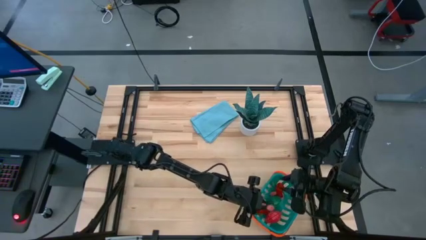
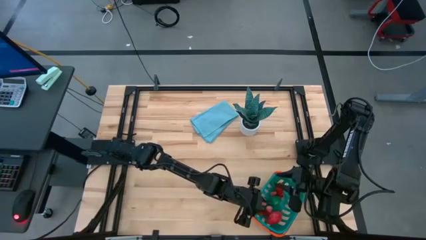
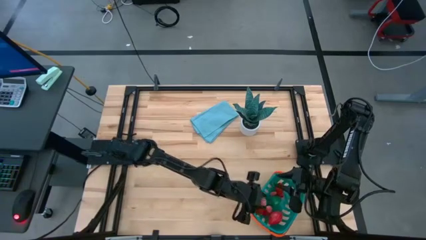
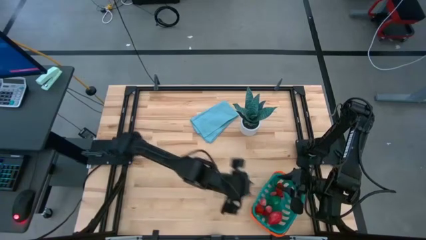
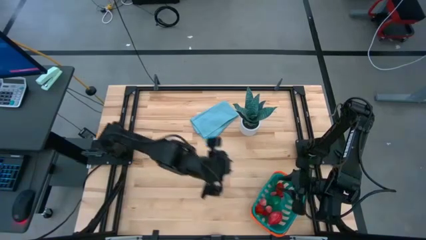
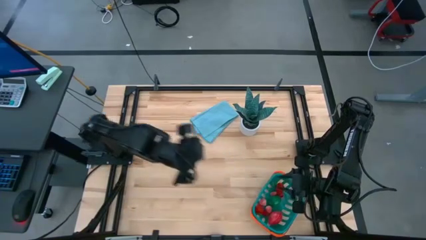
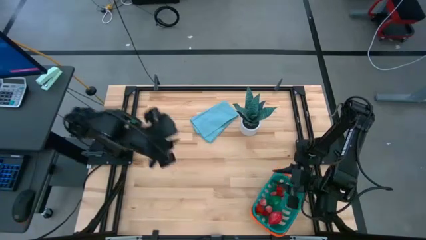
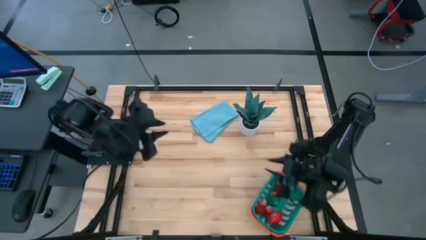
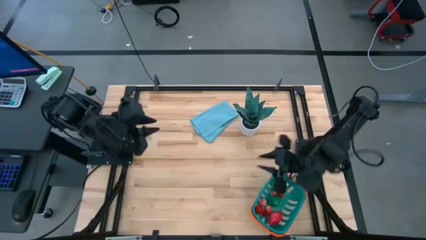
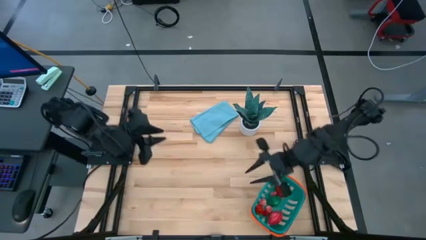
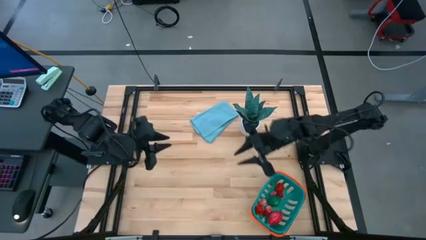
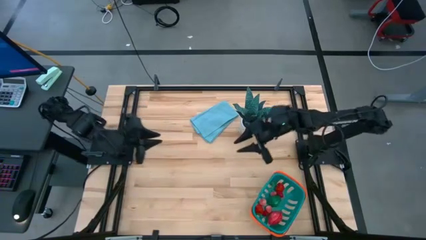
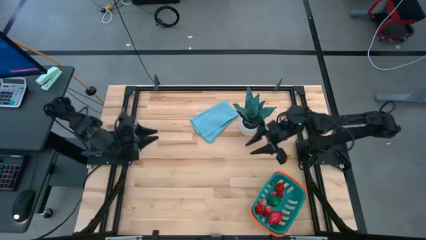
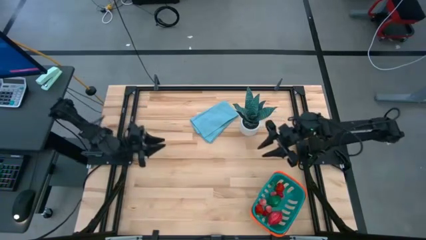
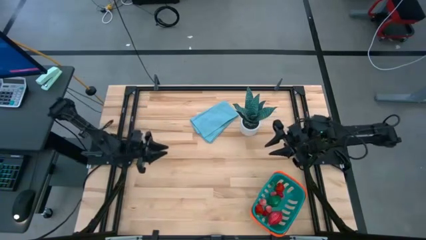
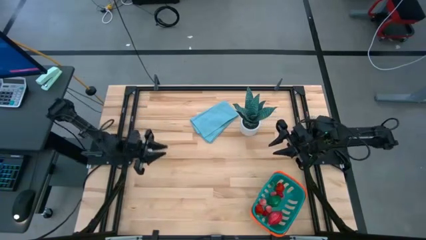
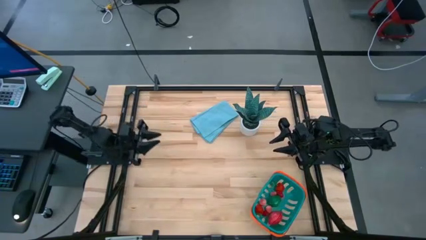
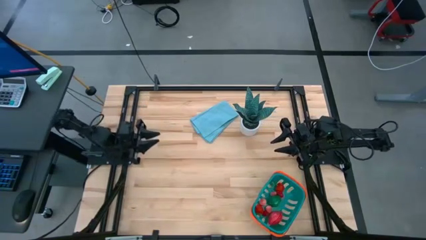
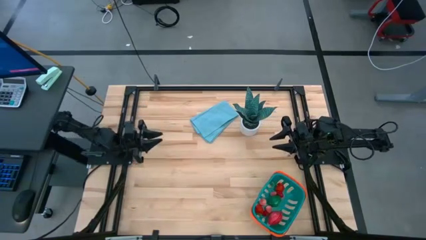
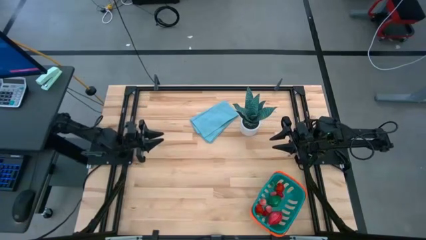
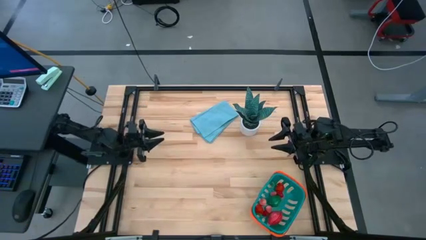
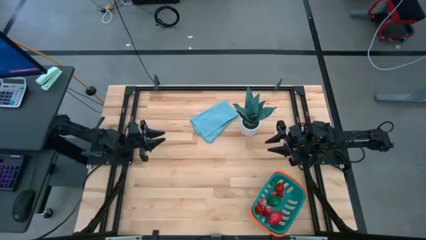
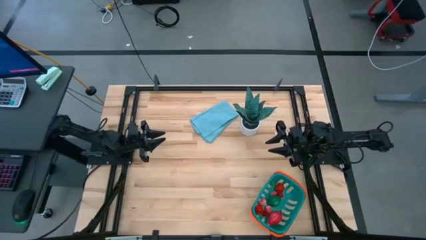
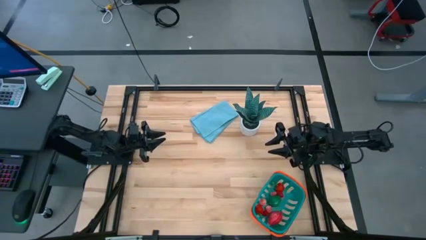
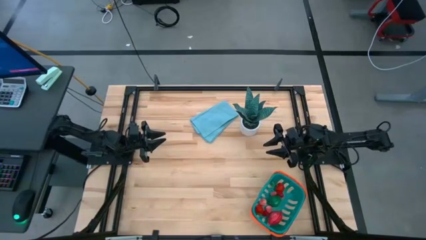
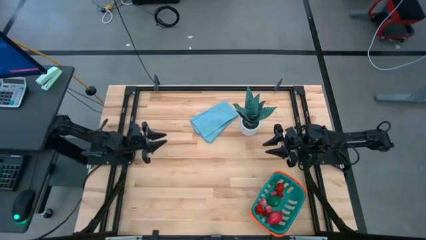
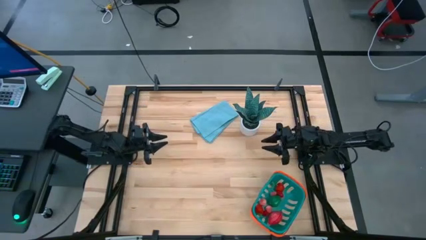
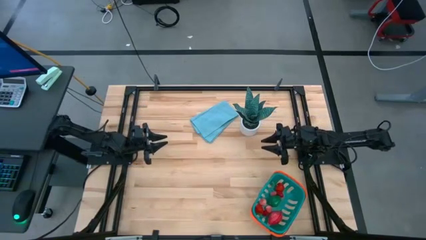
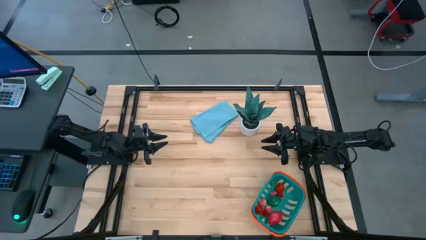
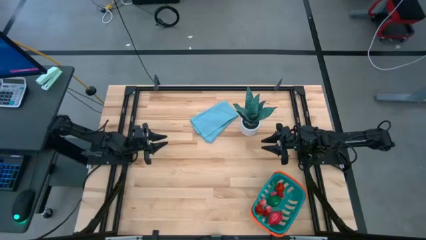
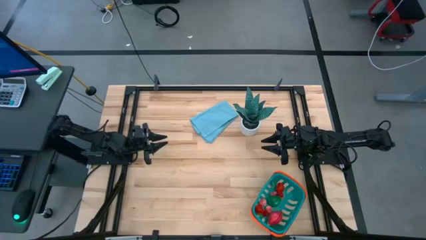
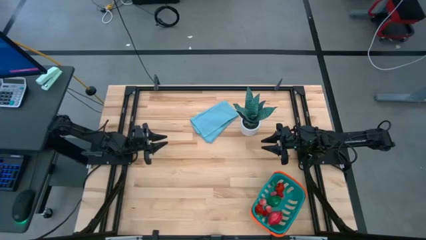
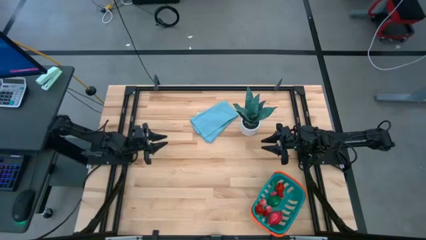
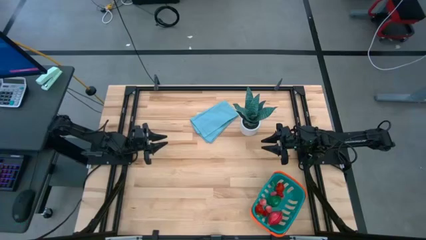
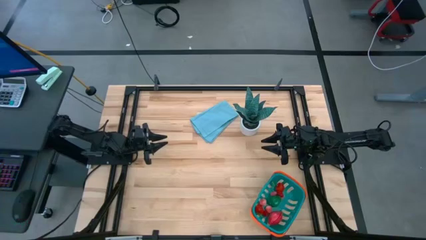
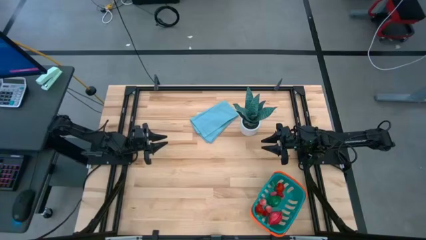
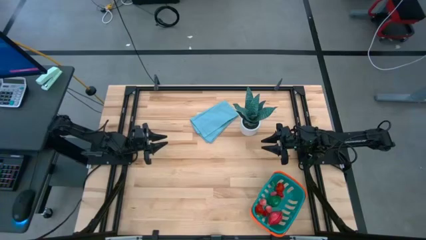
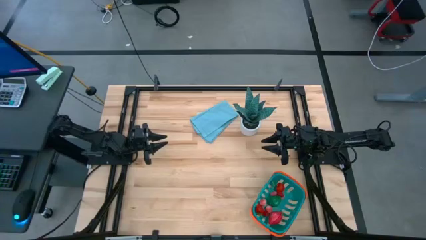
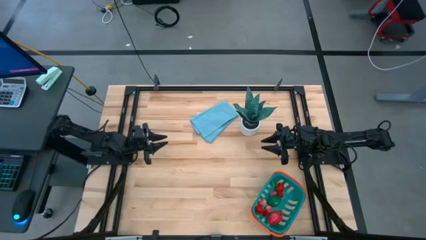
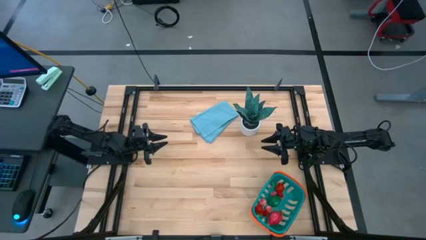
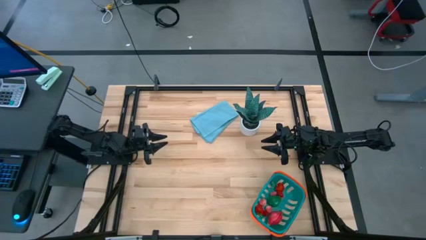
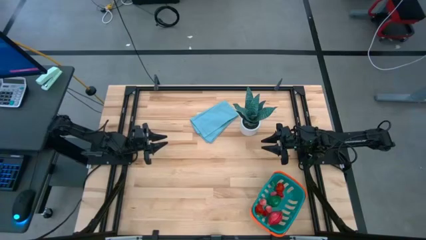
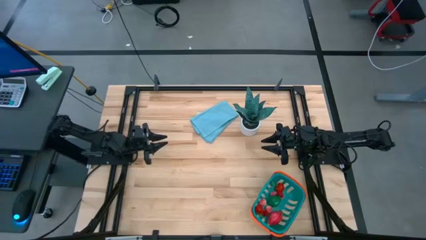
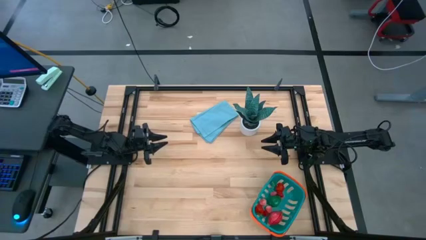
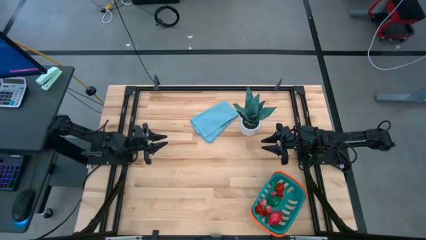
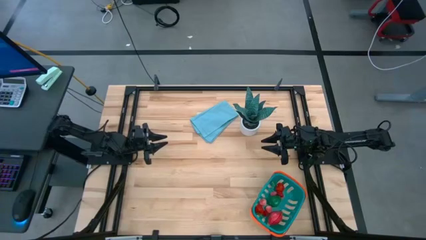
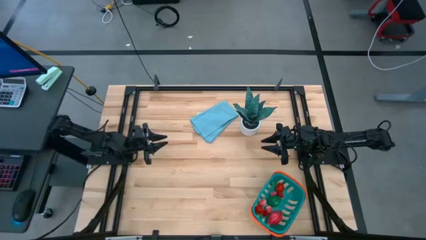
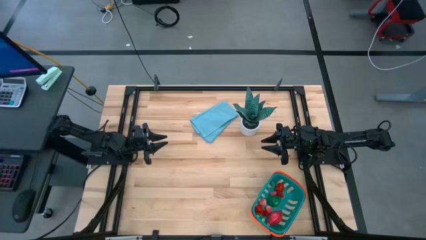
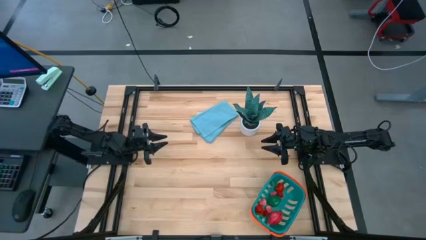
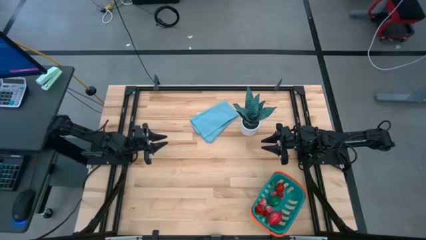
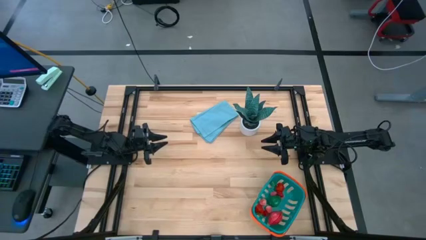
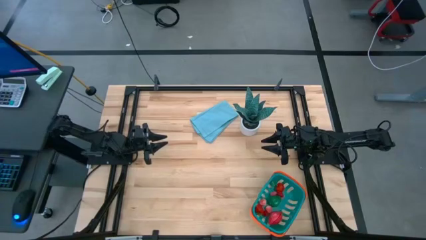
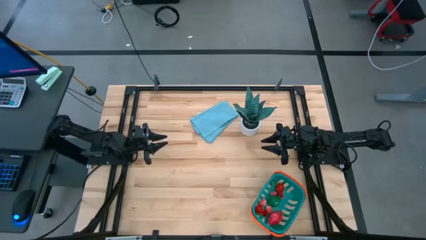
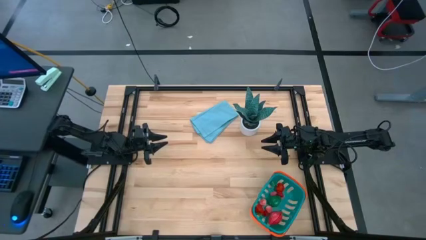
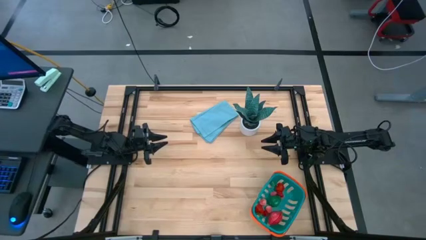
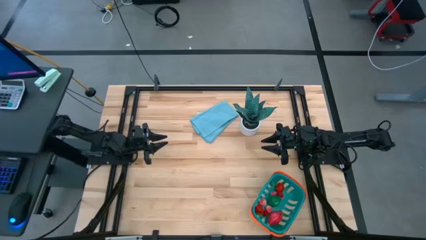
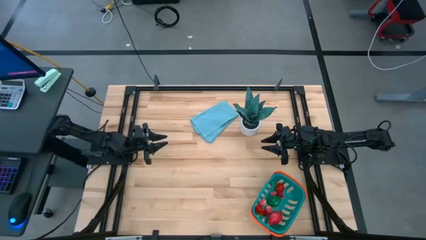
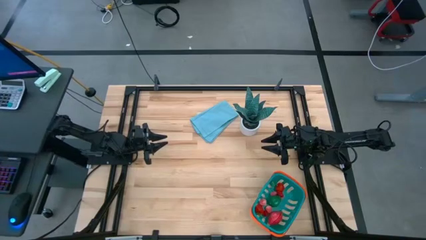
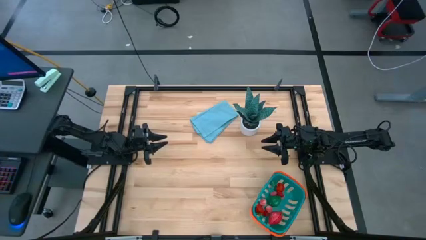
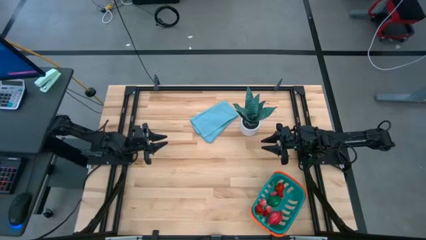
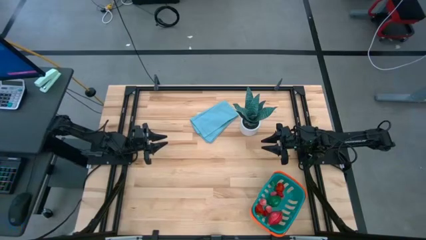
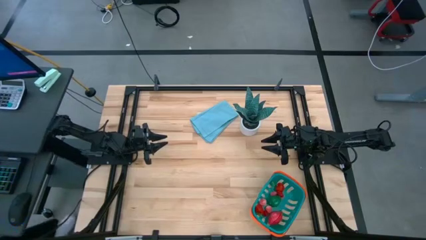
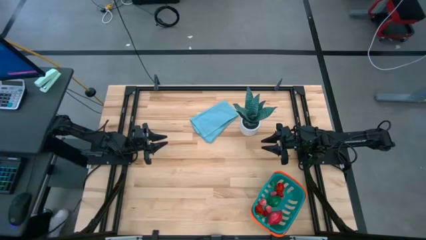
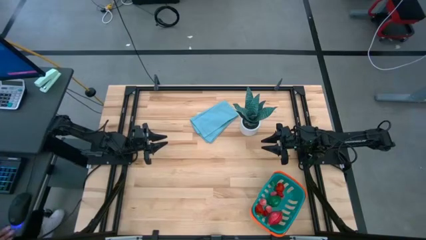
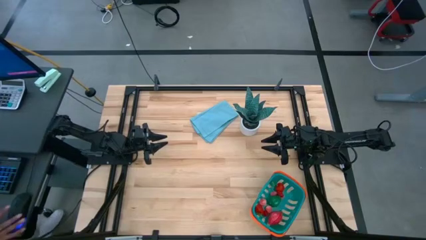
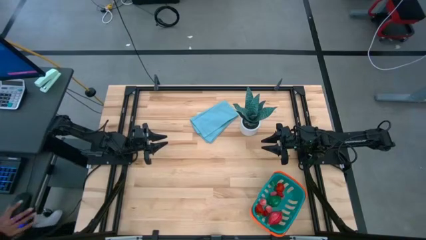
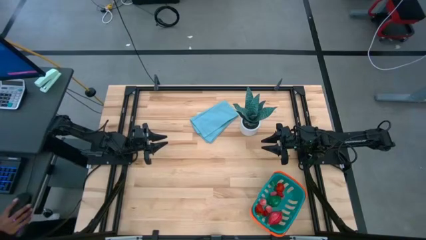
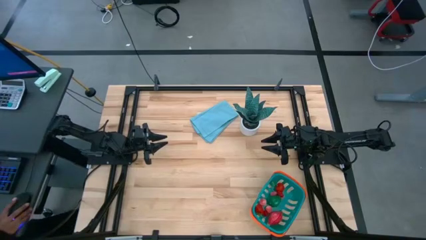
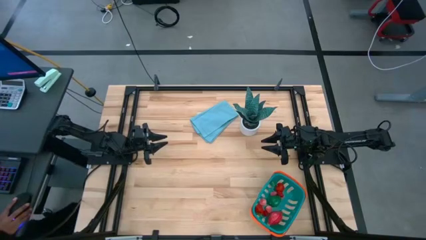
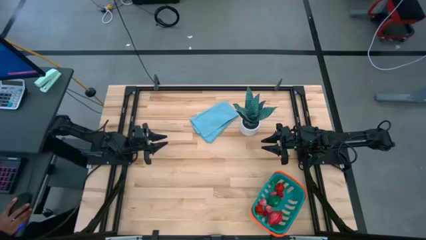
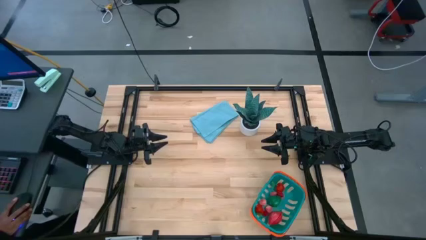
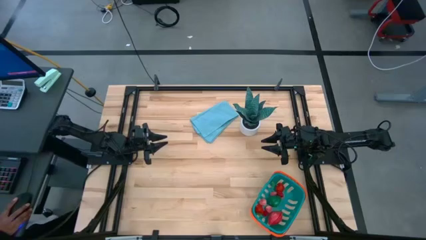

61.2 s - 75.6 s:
Task: Pick and placing Produce into tupperware
Return to Home Position
